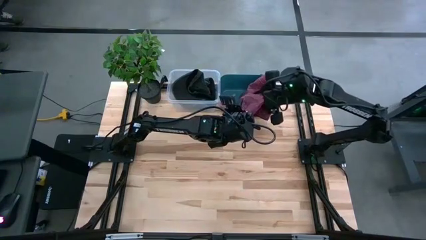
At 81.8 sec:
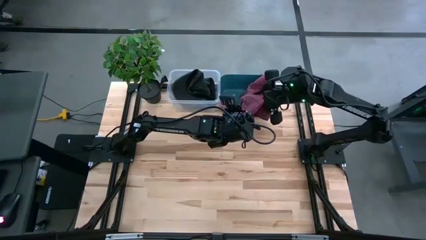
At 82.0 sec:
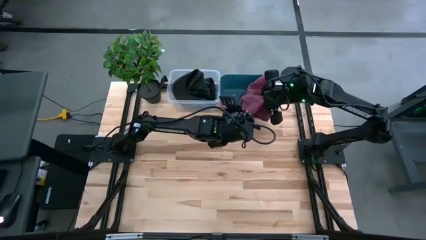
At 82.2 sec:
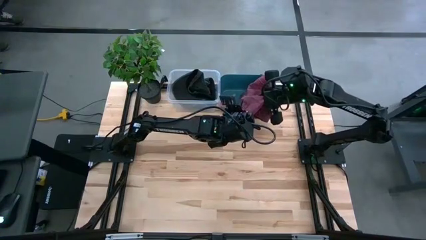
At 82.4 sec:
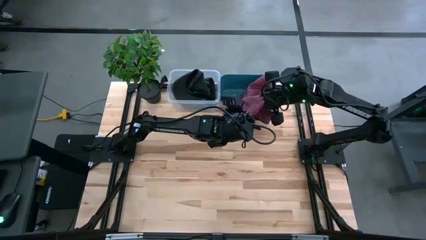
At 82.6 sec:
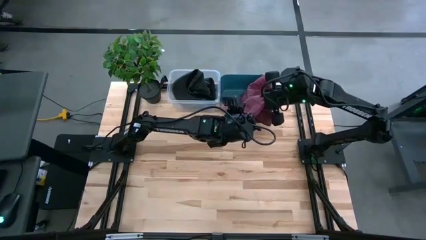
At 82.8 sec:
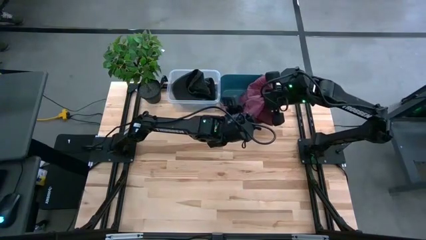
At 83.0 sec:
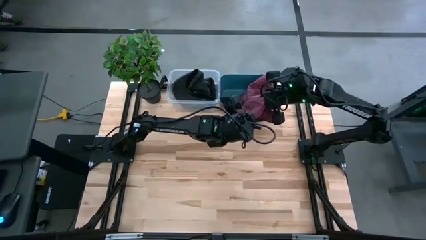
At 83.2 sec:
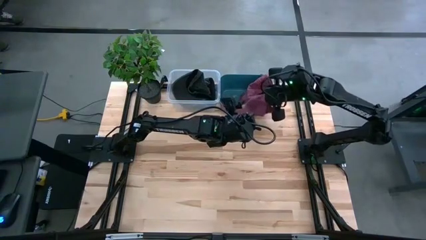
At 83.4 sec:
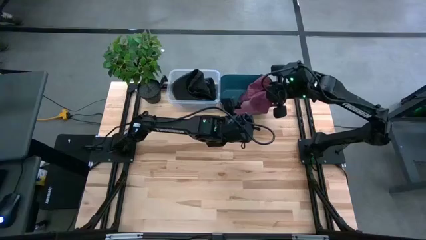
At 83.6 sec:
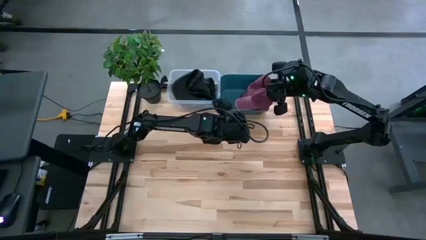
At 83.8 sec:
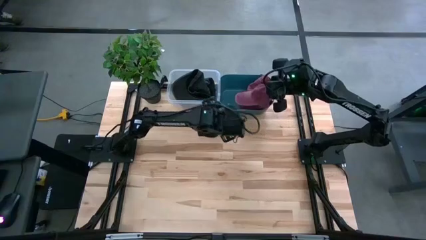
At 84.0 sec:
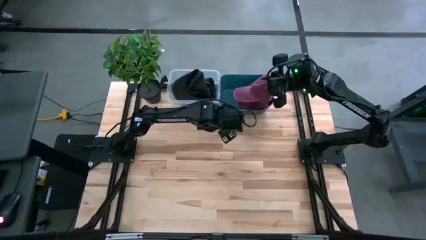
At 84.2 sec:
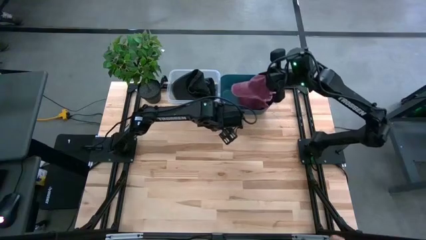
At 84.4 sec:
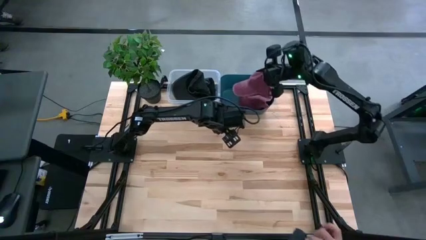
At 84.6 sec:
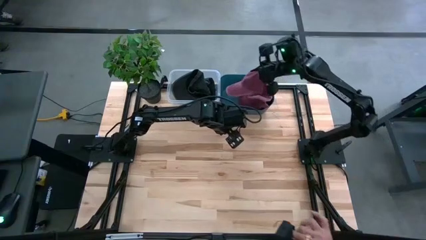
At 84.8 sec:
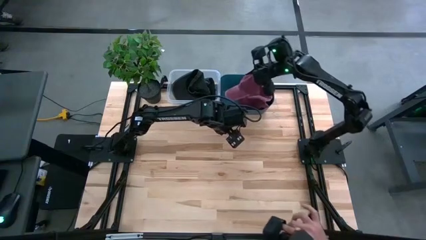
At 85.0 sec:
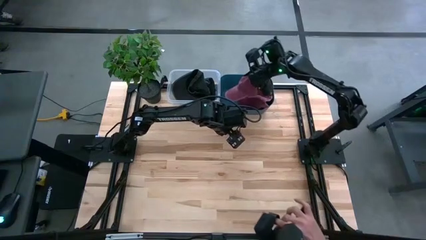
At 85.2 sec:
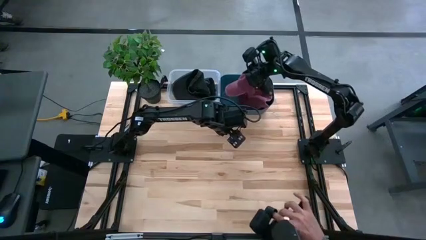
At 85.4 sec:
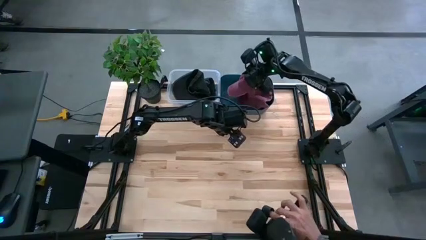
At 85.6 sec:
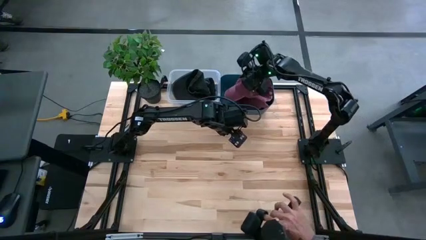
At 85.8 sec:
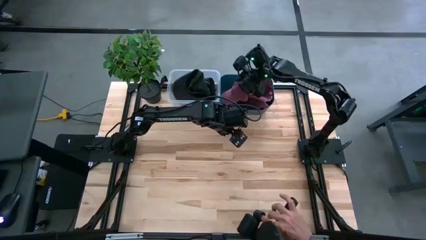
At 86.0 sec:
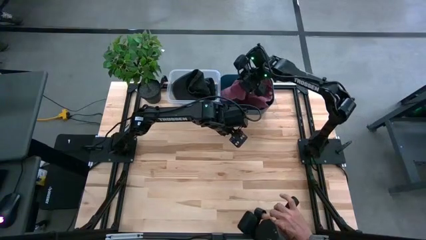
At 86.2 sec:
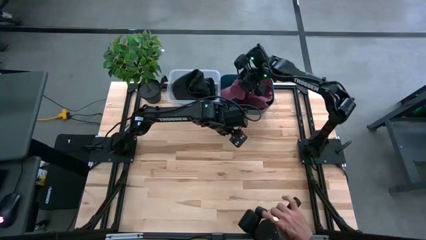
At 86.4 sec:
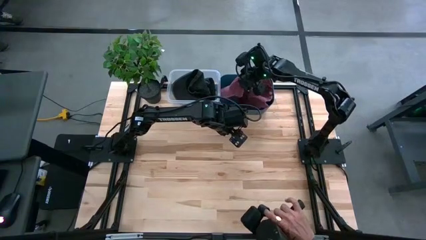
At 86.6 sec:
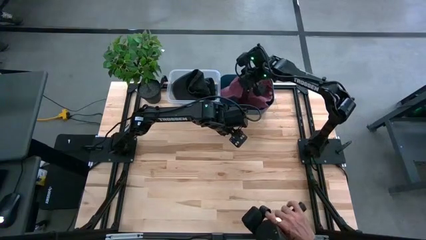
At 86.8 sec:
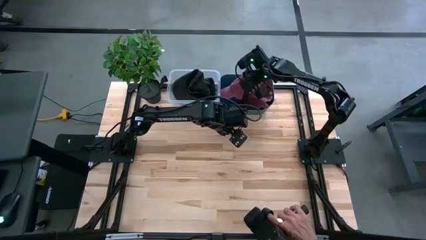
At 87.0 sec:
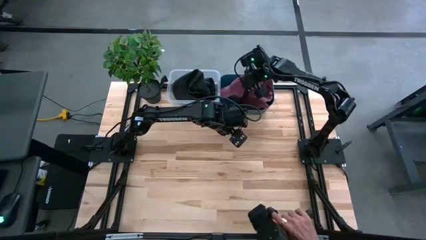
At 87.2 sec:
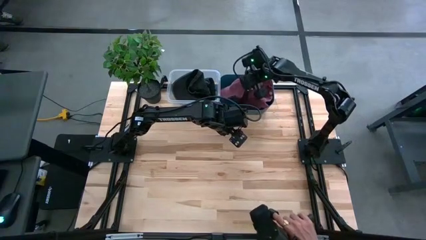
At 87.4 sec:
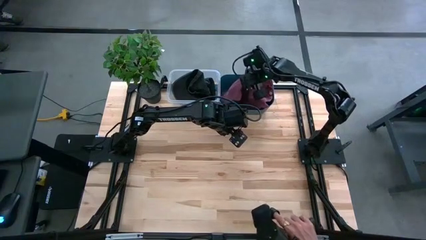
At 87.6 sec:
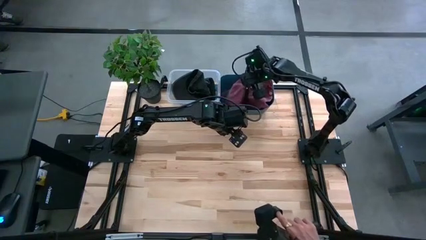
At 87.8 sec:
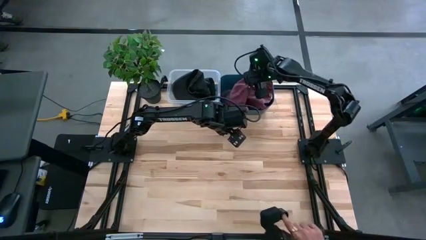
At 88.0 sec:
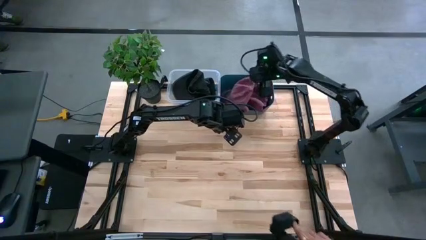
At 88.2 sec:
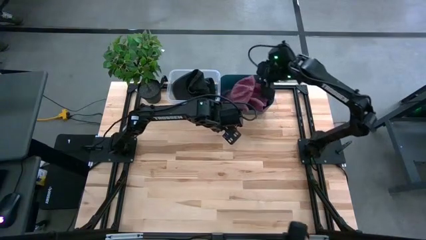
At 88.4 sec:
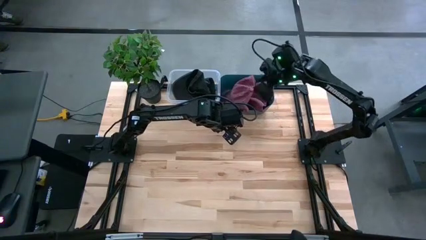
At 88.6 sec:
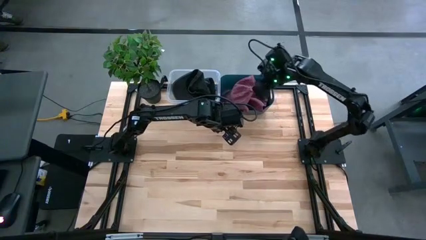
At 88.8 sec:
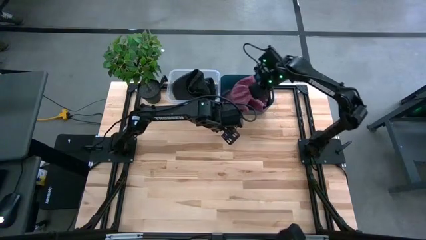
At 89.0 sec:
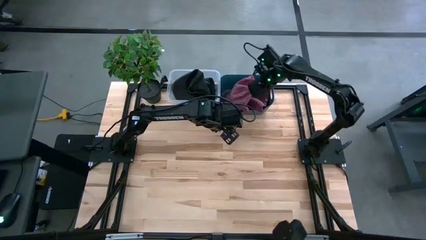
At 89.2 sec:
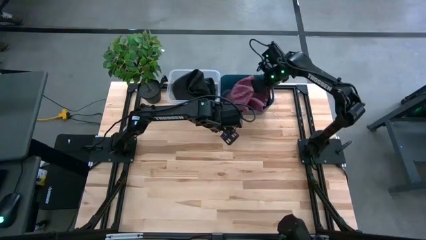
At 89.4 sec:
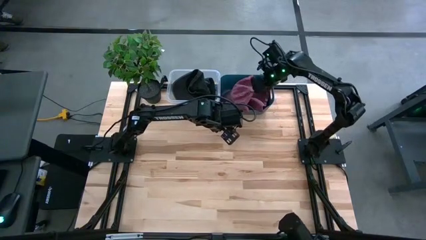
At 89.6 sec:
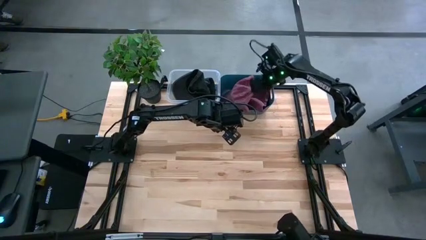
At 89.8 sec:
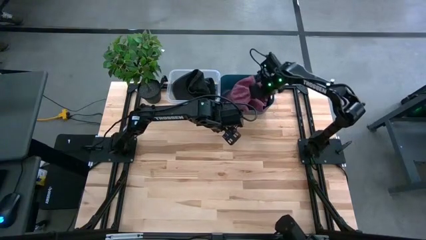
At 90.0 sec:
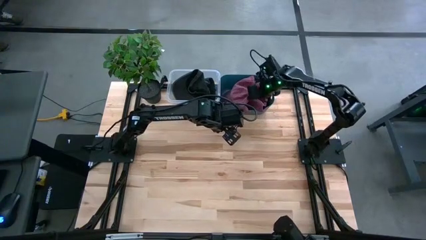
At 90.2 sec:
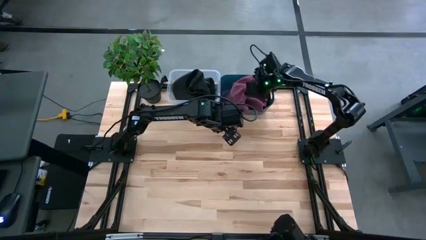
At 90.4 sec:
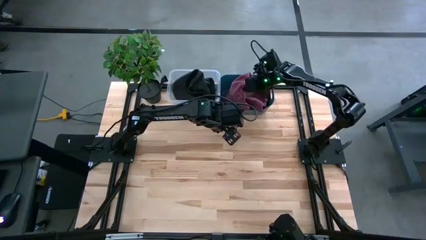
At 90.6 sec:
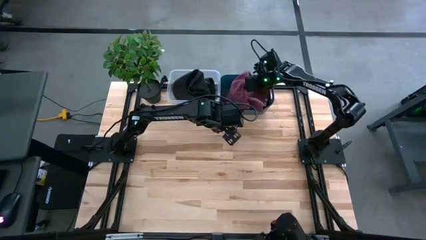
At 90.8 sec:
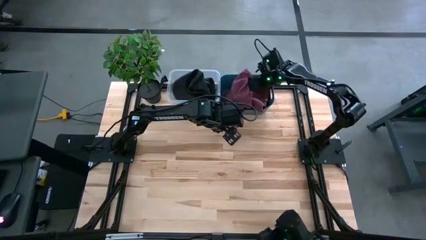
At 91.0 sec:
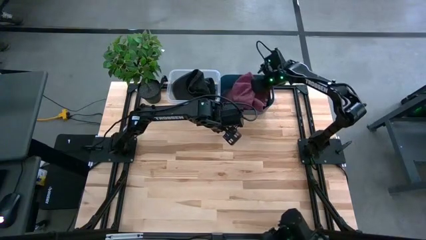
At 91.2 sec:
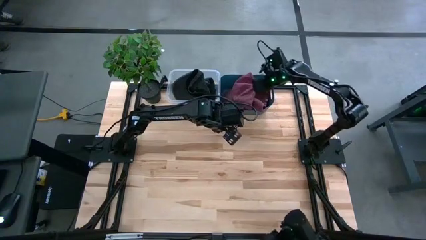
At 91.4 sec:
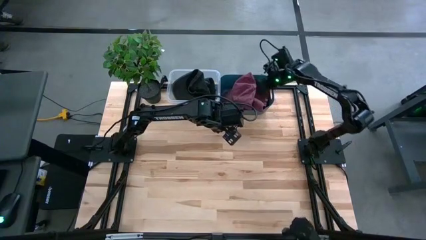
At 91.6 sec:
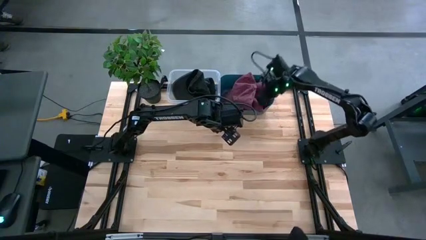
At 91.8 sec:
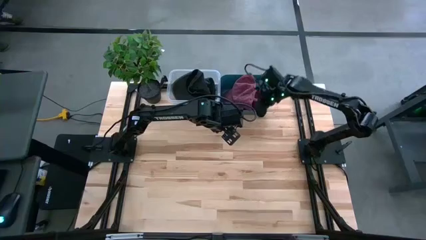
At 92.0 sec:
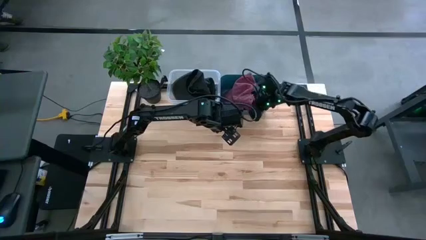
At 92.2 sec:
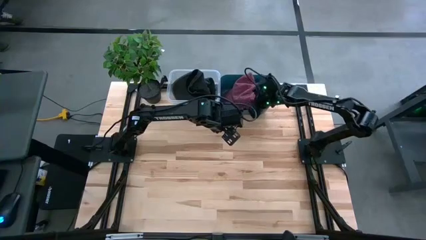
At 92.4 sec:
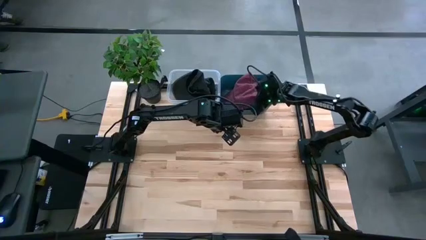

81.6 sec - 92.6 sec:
Task: Pick & Place hat
Put the red cap into the blue bin

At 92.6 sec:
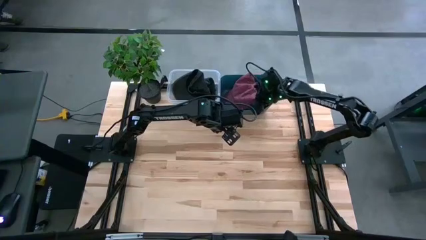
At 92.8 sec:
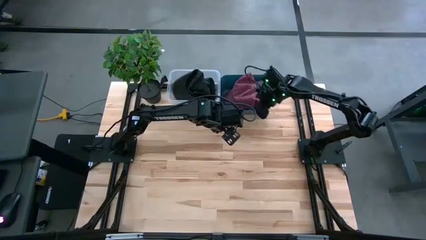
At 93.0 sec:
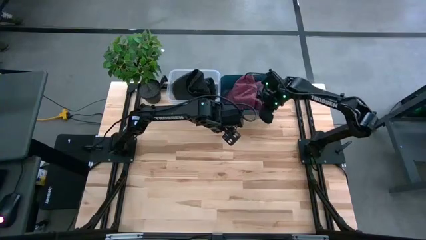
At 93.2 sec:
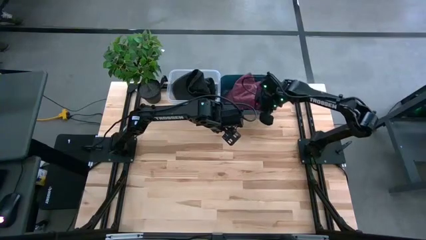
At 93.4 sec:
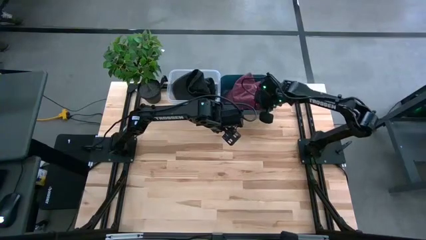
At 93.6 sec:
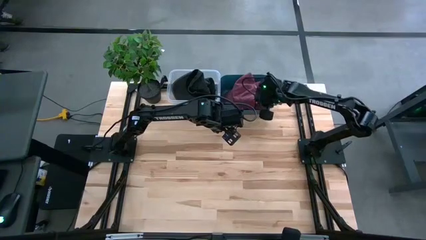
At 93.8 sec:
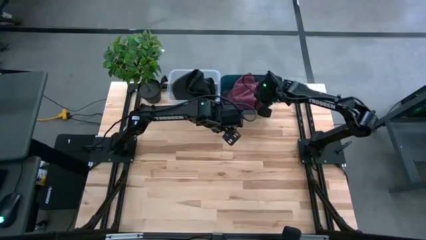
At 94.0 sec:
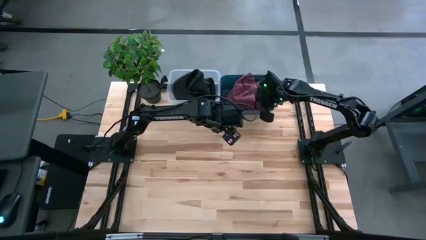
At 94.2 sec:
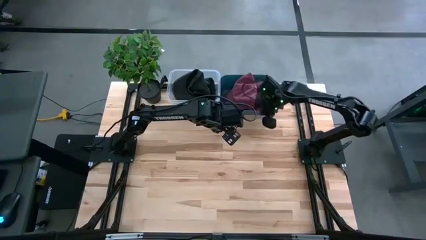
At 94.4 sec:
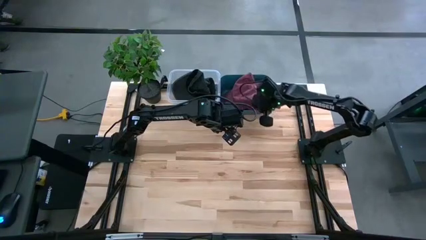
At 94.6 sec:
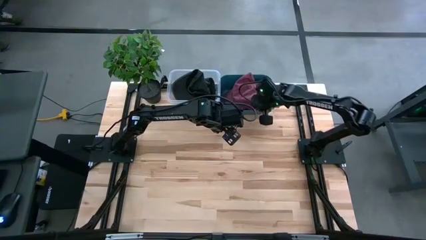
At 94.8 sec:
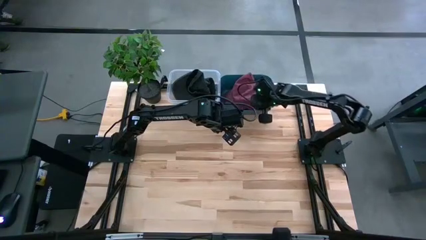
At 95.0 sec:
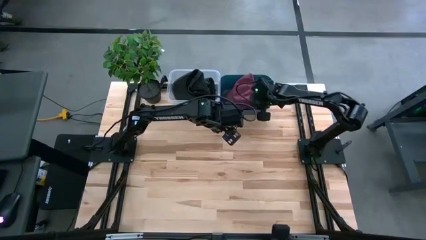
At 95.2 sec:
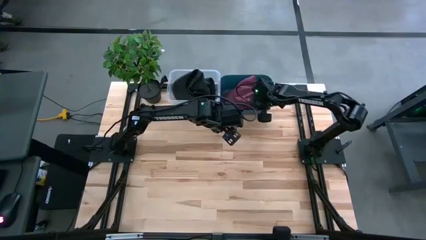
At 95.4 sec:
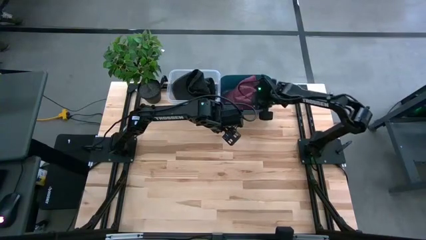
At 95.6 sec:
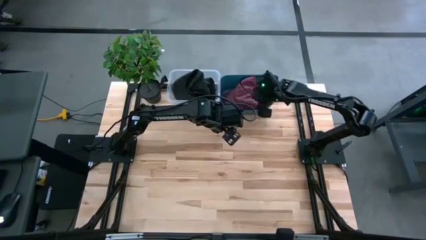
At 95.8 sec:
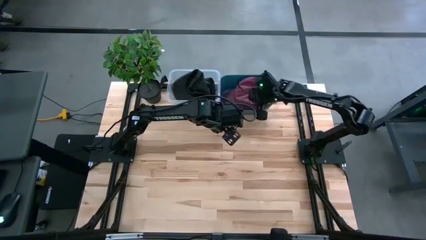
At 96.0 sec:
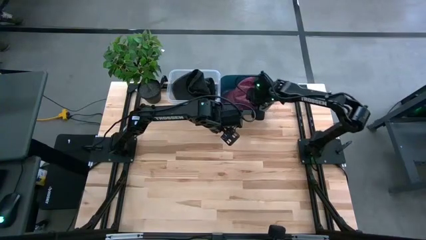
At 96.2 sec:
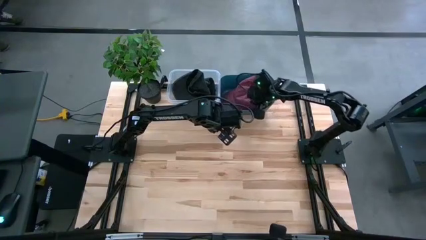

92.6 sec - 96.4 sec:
Adjust the red caps in the blue bin
